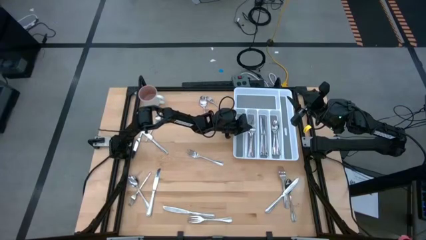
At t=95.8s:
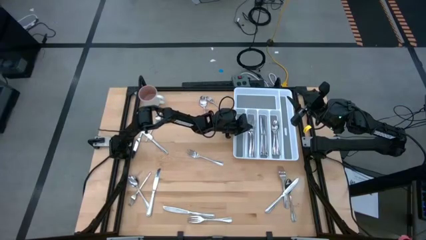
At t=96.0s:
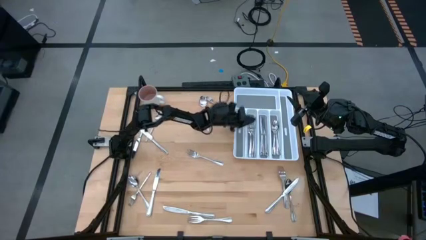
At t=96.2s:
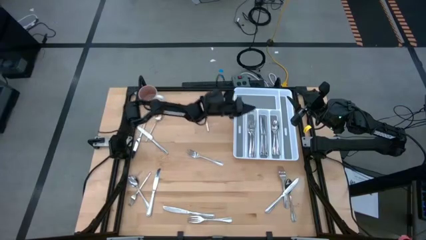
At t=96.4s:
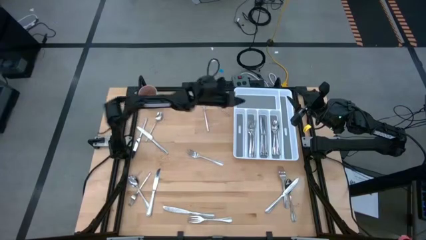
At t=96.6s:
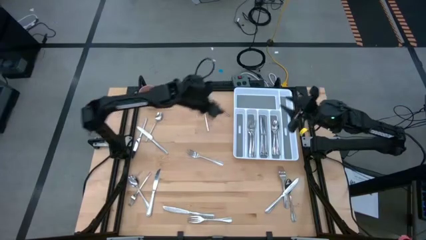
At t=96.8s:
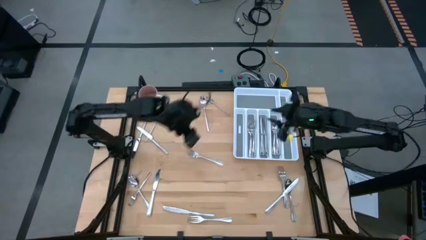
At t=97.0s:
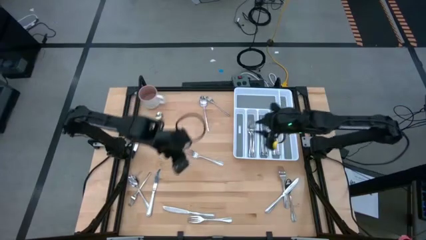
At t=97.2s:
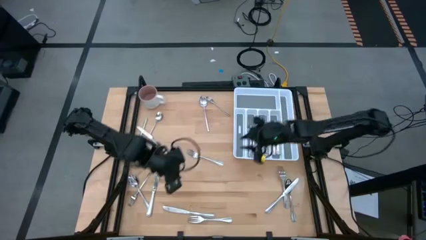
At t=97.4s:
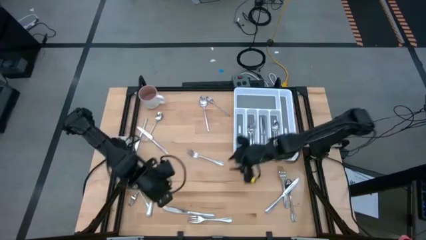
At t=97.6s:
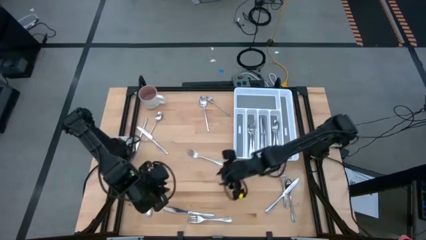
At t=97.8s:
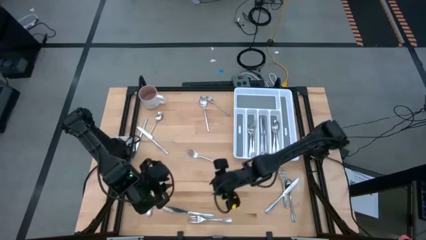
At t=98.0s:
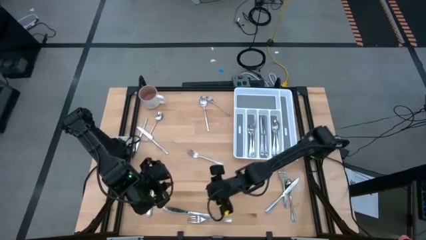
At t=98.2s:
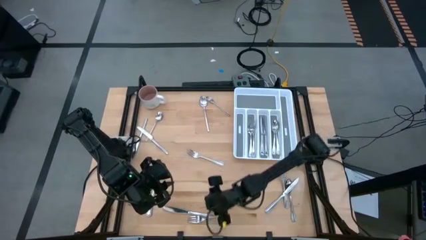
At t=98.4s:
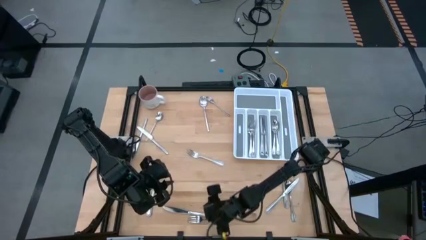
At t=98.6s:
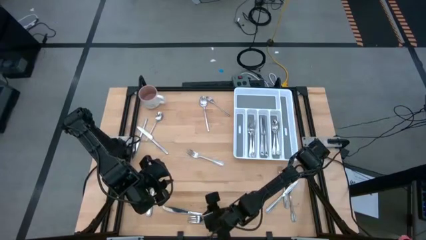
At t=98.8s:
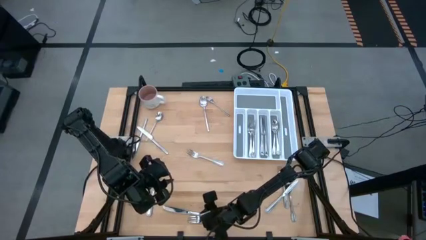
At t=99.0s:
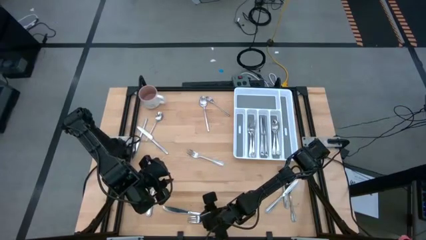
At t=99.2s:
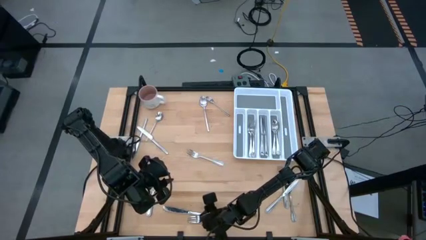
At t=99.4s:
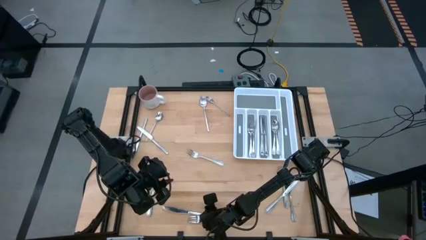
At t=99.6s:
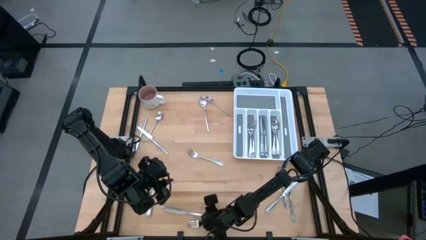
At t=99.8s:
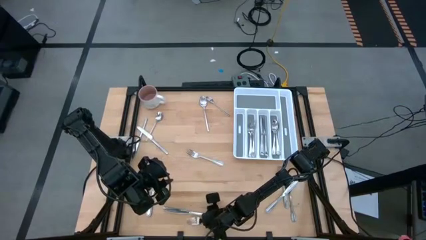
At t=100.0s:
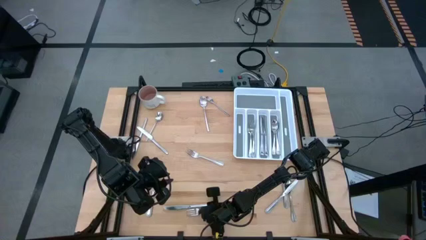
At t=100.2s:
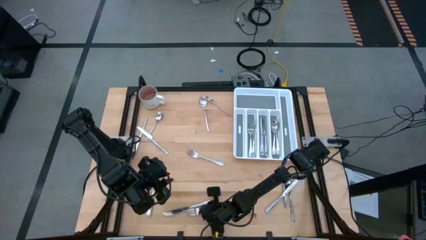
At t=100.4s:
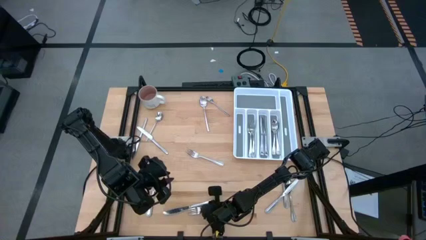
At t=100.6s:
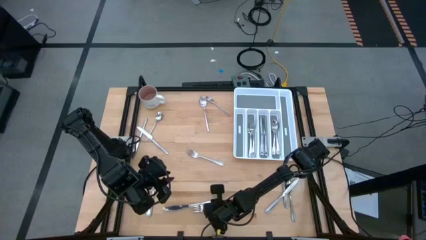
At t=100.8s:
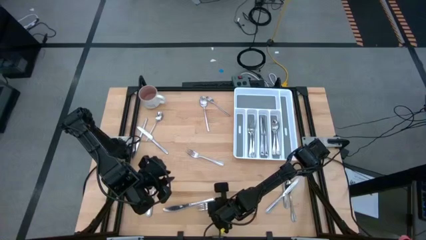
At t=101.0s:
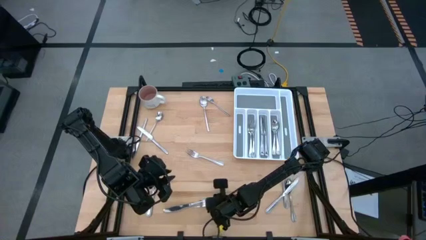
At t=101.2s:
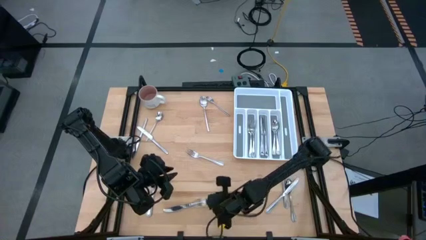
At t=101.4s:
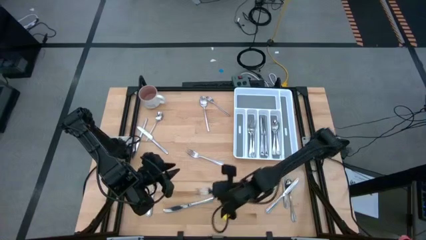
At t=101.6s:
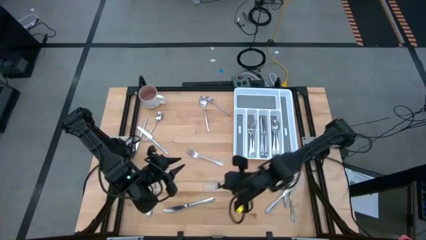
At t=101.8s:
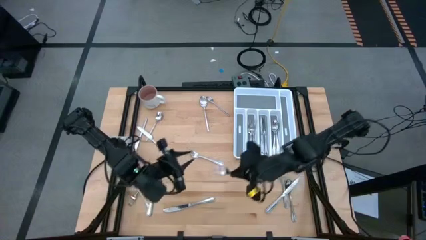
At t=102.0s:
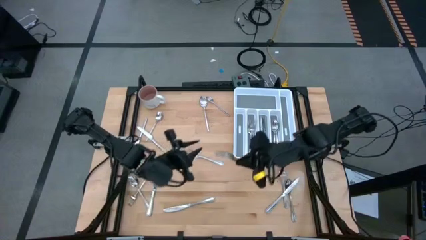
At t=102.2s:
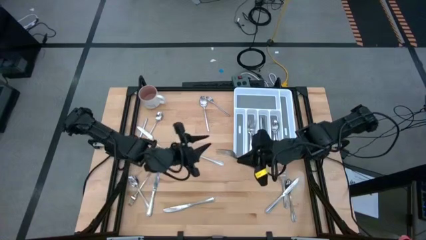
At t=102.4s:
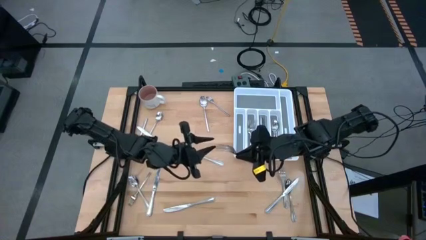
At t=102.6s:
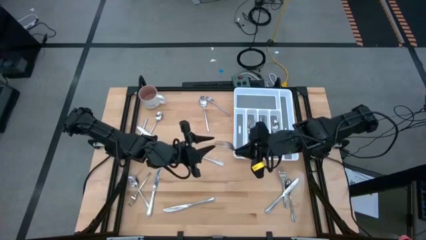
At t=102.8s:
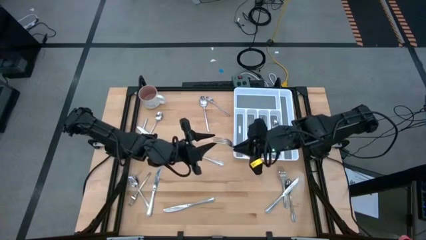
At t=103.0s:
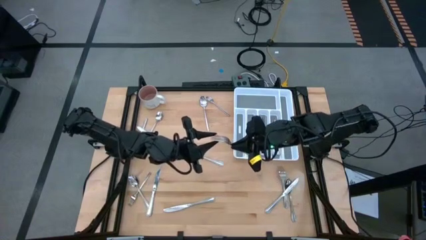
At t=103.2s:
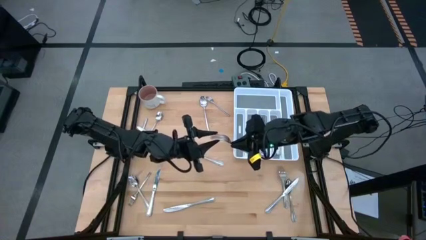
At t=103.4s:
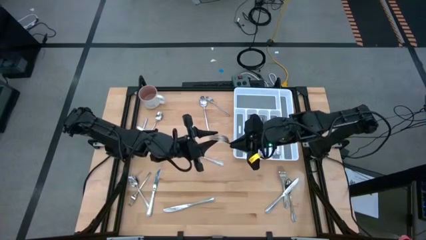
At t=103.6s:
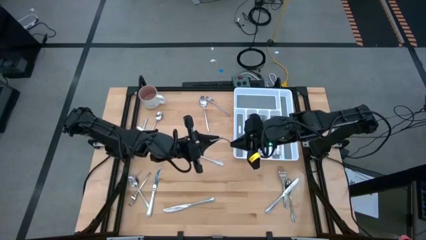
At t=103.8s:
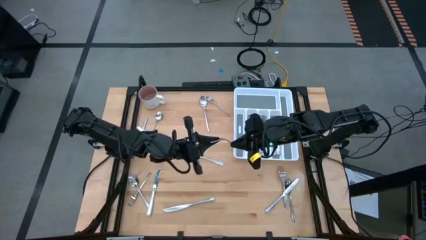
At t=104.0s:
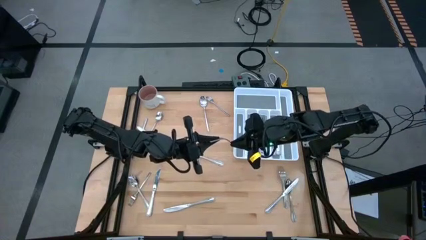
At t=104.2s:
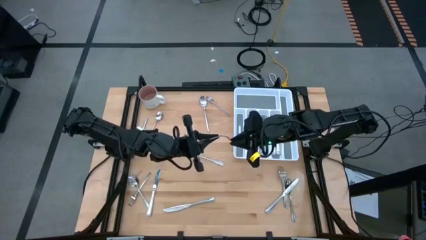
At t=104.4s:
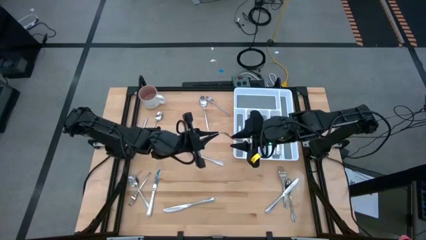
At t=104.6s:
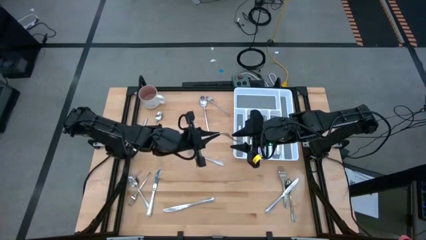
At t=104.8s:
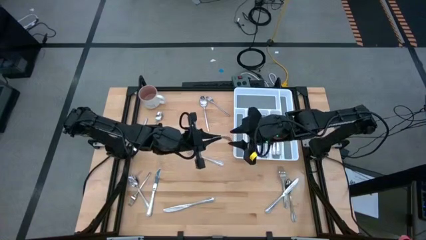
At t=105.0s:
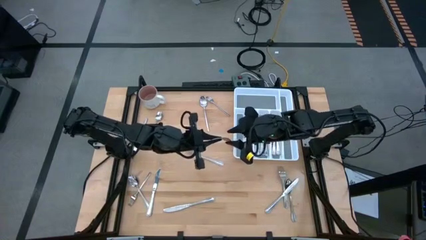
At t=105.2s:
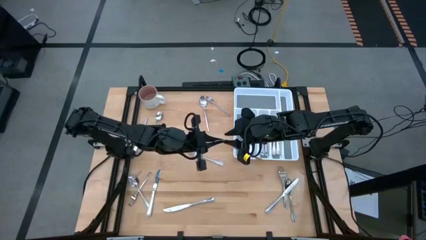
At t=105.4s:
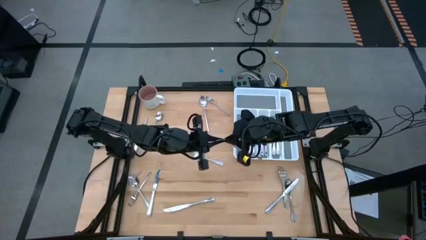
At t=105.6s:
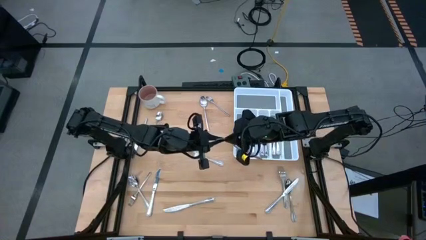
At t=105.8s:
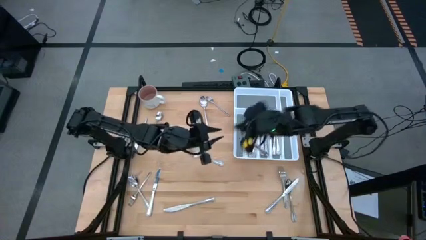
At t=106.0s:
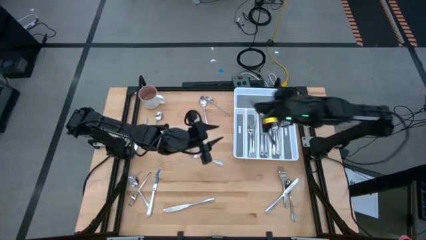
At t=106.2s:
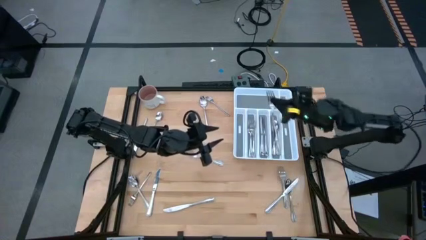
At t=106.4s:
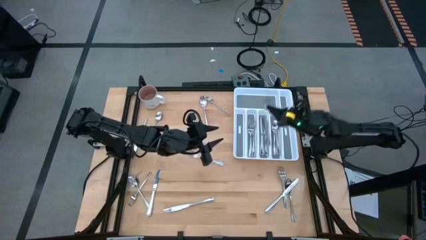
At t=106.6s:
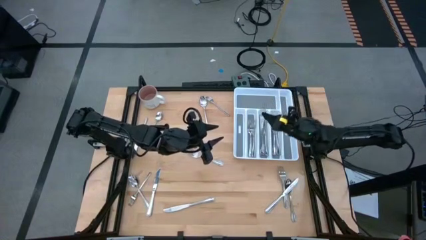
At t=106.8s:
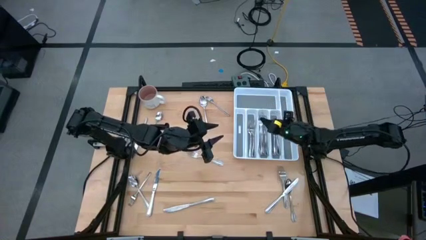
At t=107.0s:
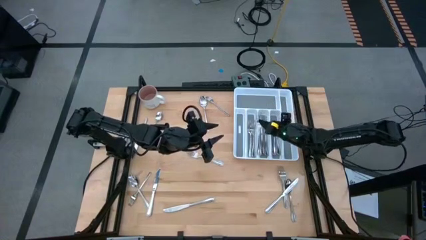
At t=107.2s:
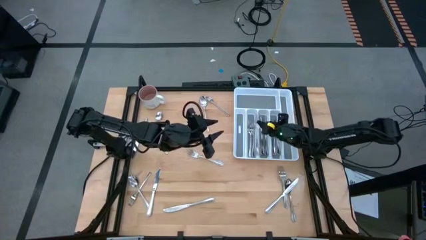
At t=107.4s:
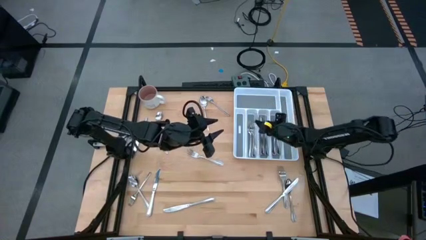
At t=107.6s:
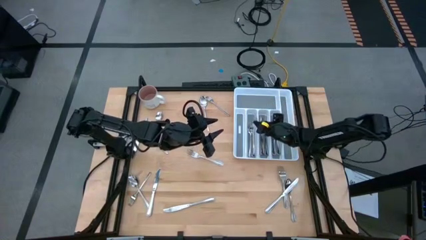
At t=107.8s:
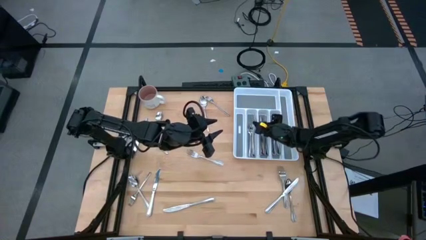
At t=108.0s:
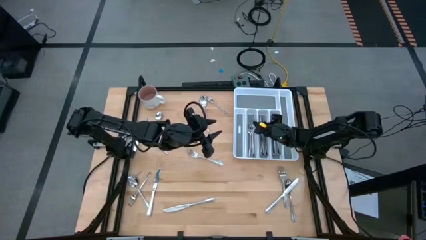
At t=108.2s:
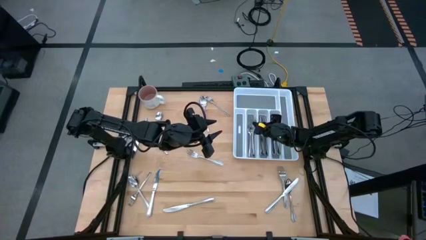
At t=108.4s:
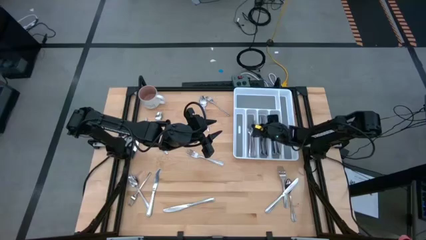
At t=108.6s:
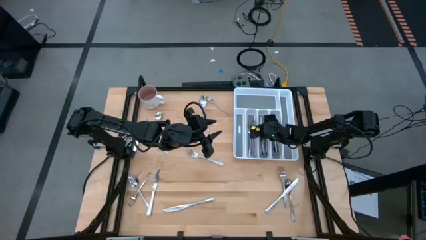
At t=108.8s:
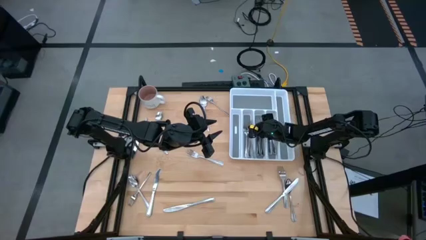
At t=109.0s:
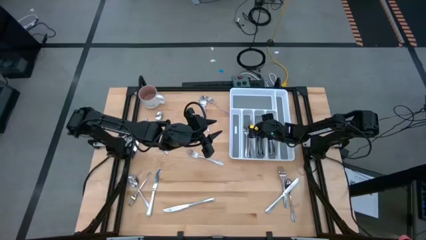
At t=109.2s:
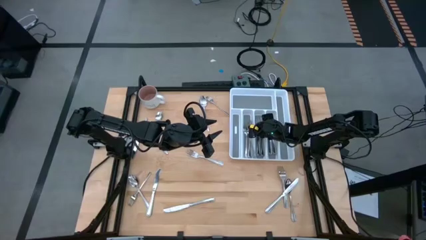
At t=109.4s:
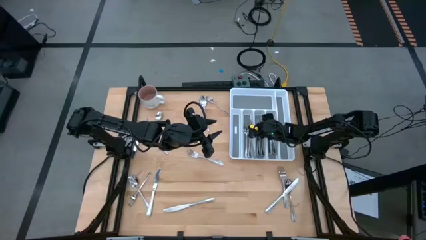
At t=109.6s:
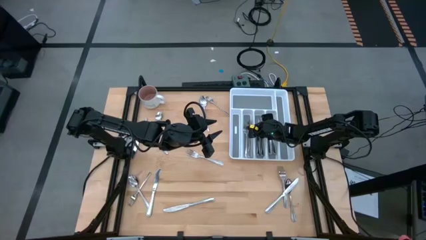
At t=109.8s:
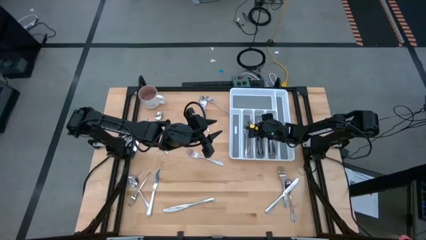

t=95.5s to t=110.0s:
Task: Sort silverware
Put the silver fork into the silverware tray

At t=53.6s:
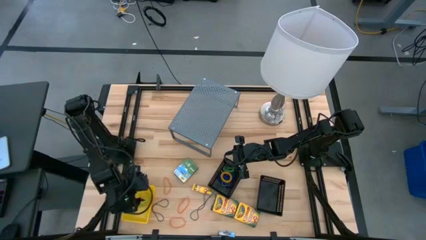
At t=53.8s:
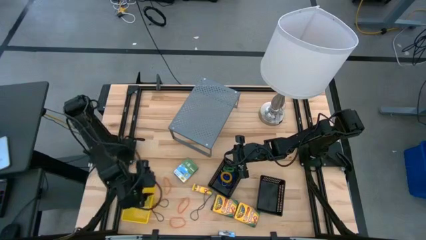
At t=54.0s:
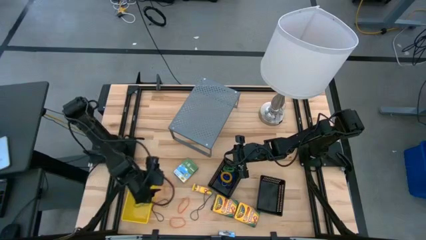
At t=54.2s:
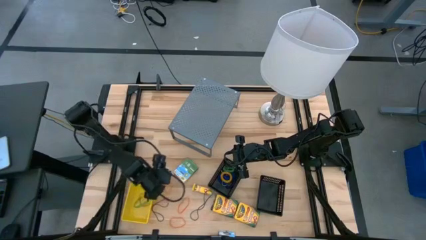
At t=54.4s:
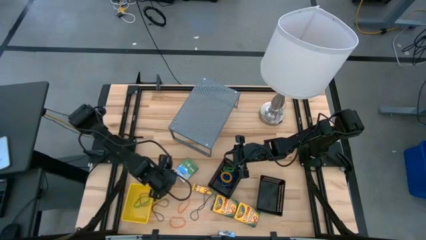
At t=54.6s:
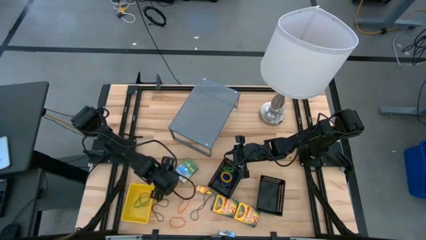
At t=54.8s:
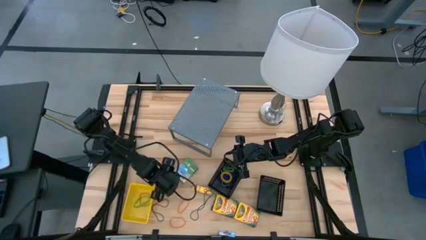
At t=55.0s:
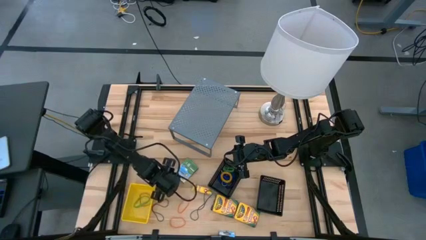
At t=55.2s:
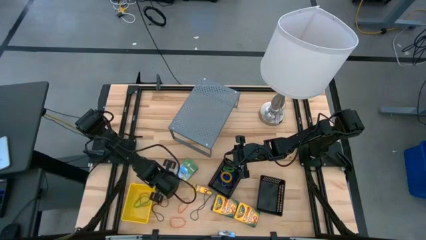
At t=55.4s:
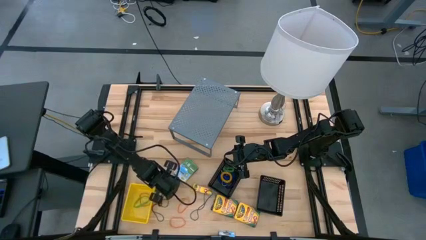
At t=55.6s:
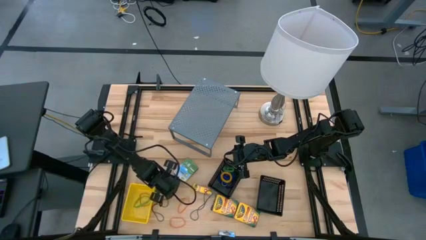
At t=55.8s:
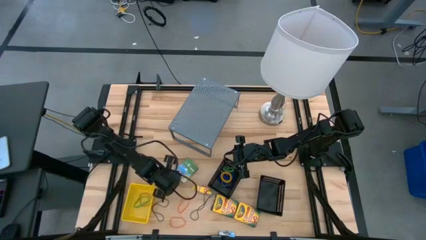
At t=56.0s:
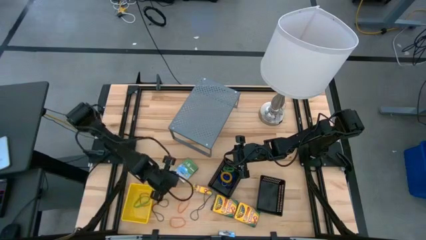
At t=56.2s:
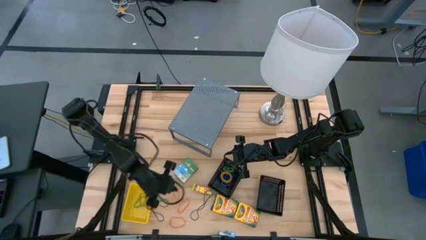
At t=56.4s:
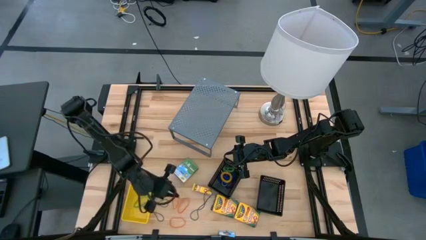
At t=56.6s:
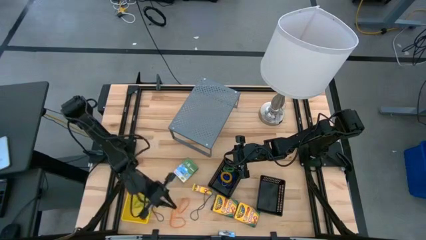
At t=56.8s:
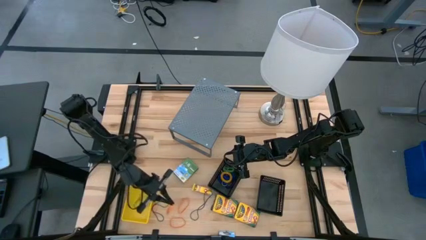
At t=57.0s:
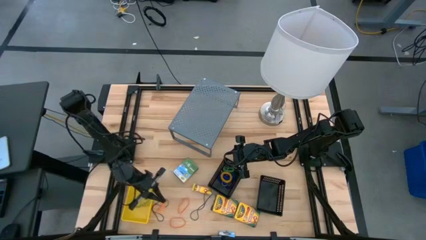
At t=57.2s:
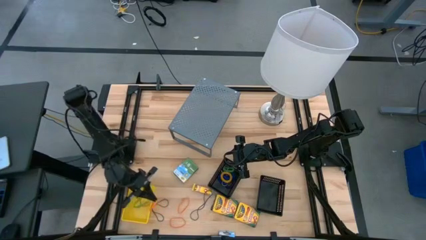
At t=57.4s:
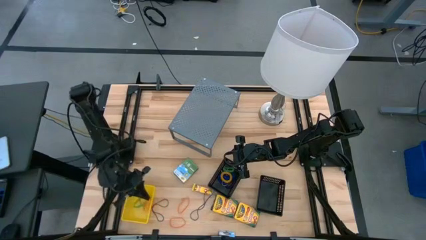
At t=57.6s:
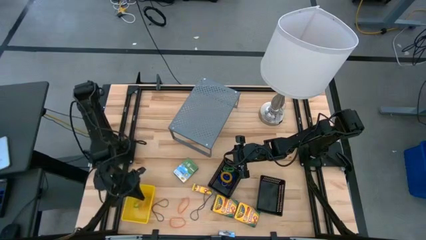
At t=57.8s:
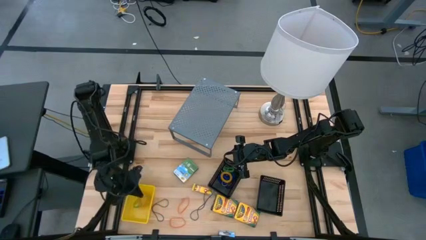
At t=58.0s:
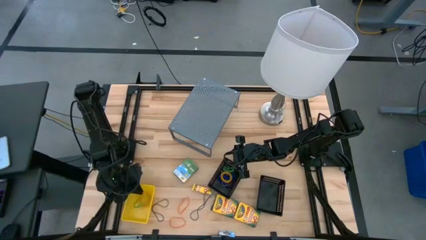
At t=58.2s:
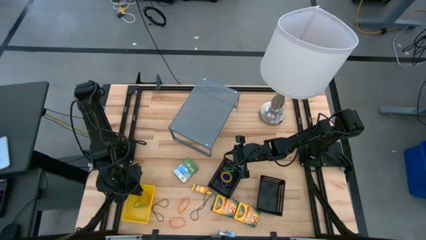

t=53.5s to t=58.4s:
Task: Pick & Place Office Desk Supplies
Put the orange rubber band into the yellow bin
